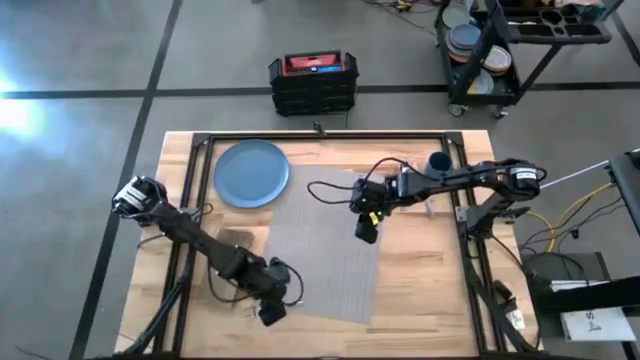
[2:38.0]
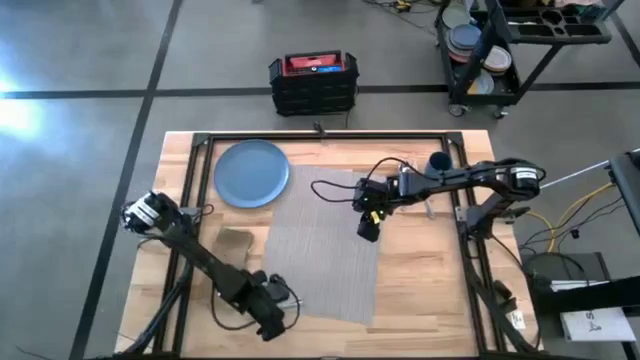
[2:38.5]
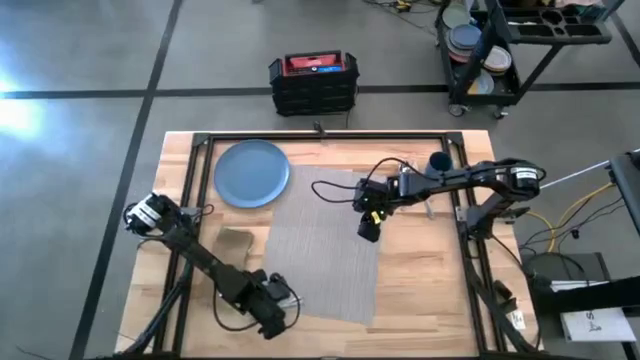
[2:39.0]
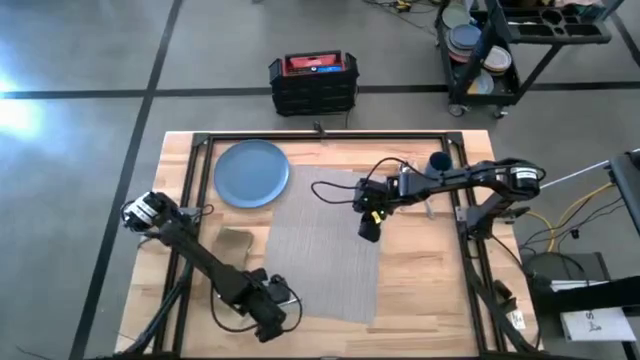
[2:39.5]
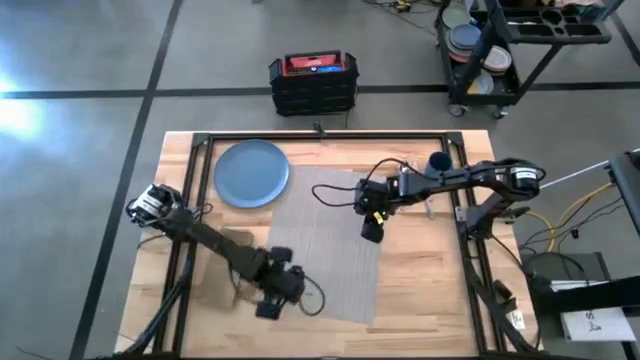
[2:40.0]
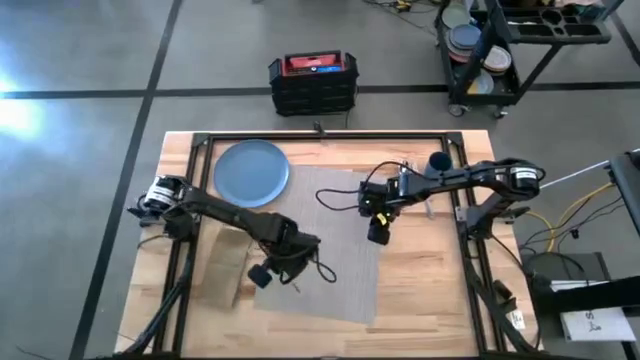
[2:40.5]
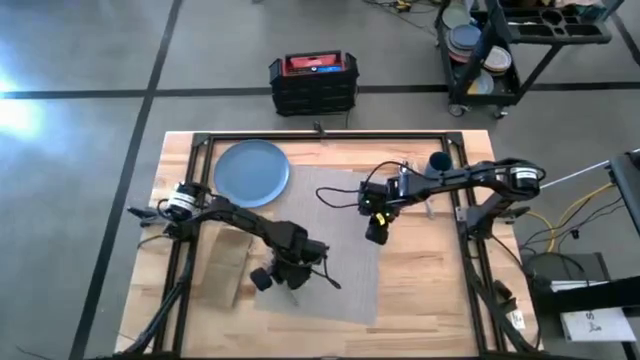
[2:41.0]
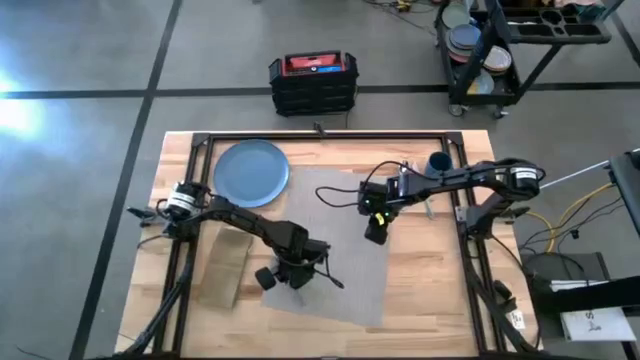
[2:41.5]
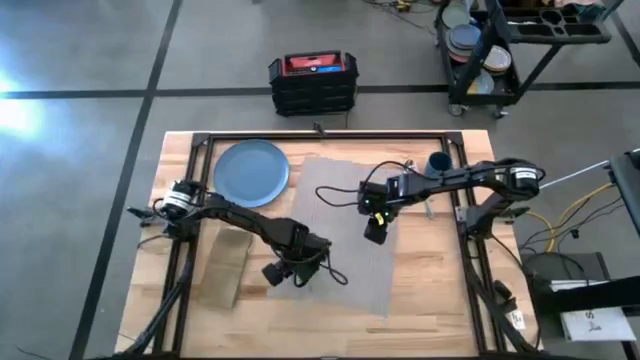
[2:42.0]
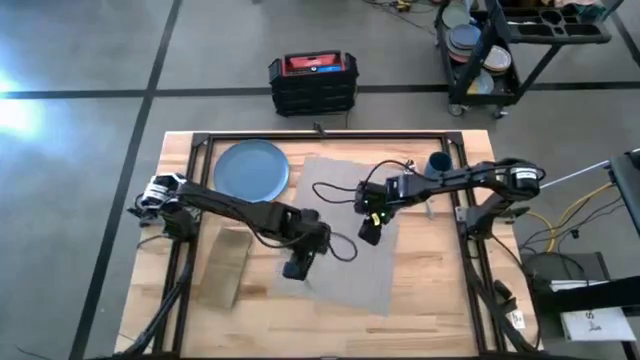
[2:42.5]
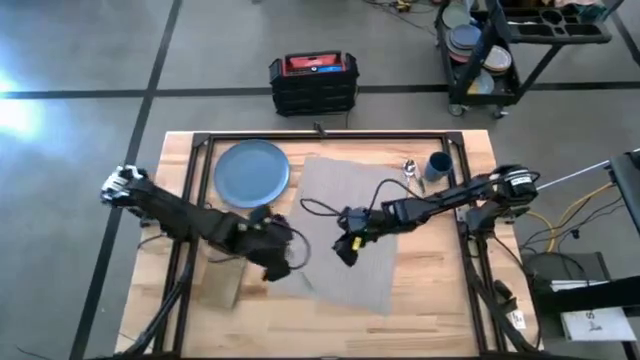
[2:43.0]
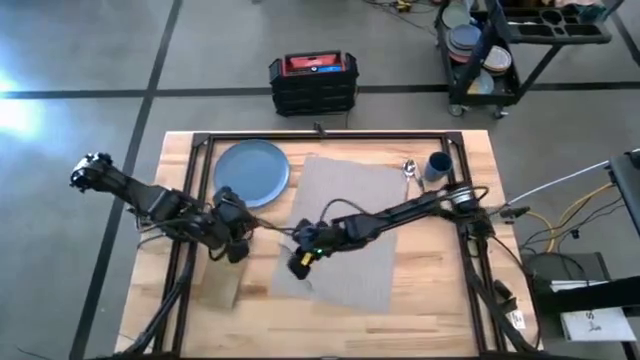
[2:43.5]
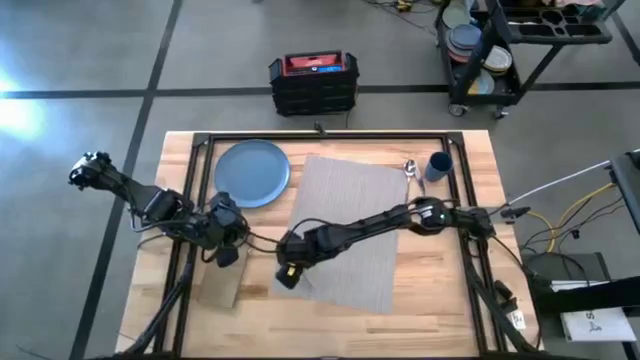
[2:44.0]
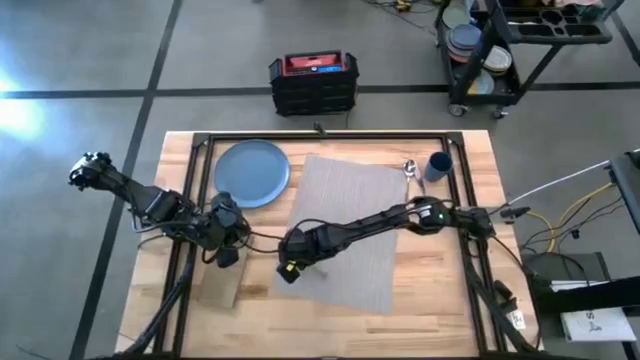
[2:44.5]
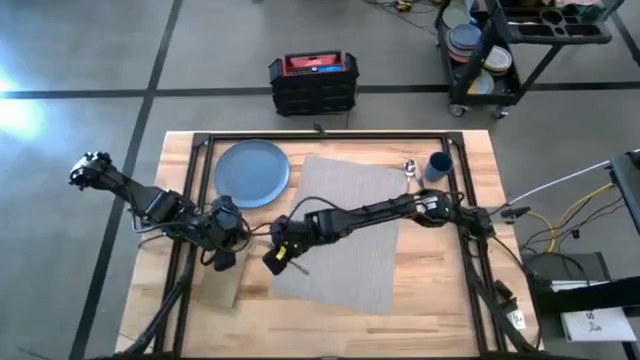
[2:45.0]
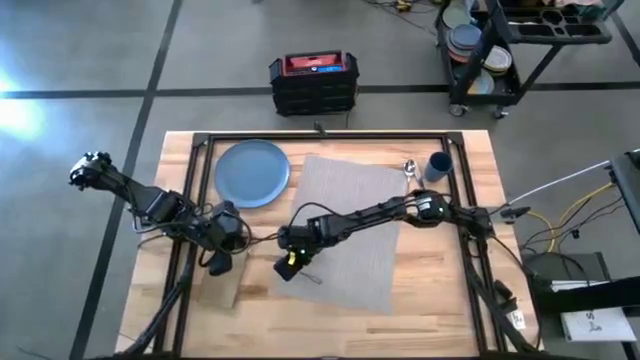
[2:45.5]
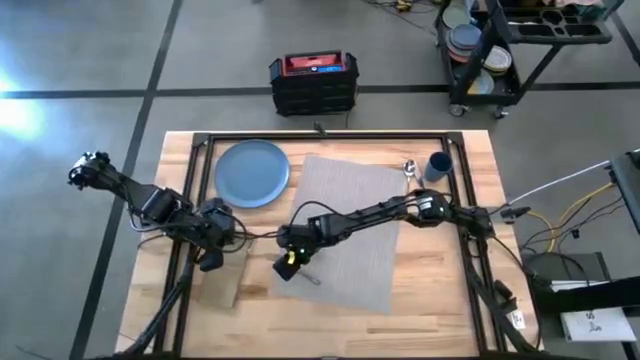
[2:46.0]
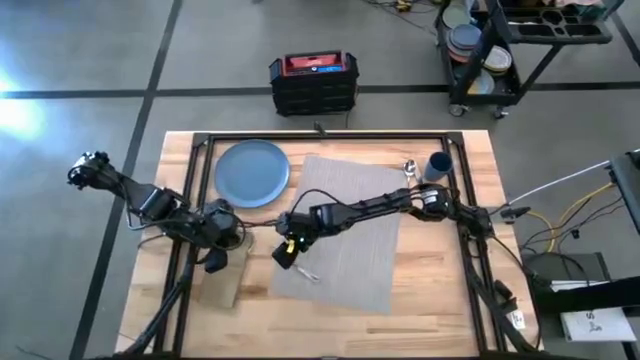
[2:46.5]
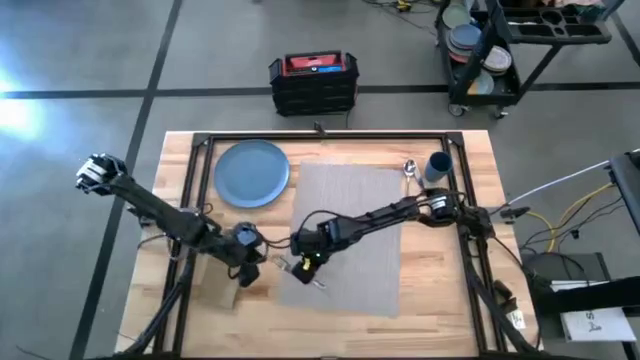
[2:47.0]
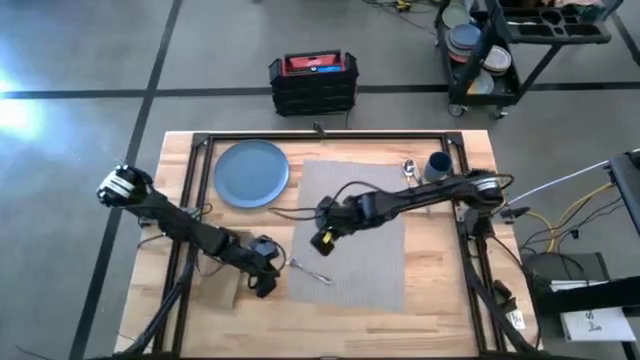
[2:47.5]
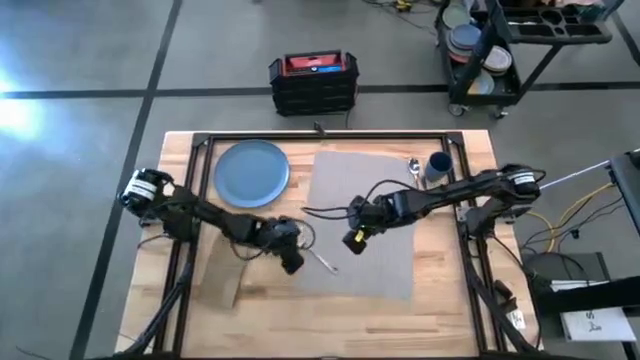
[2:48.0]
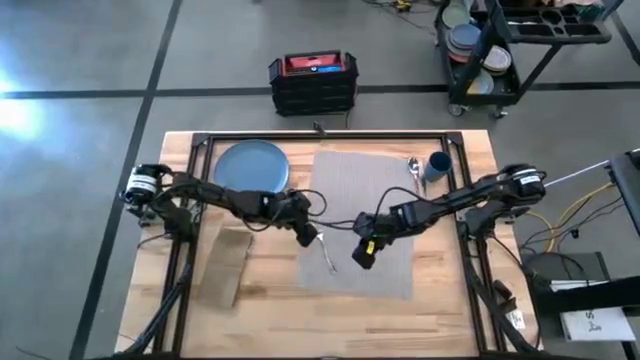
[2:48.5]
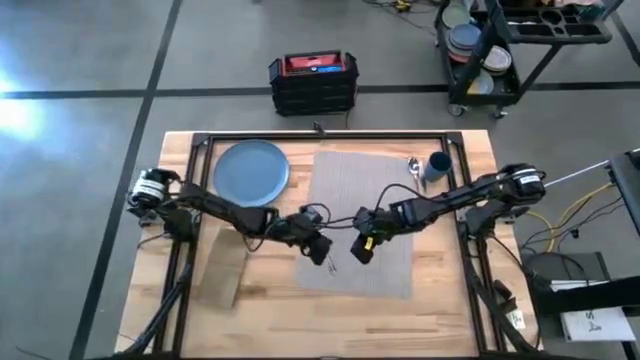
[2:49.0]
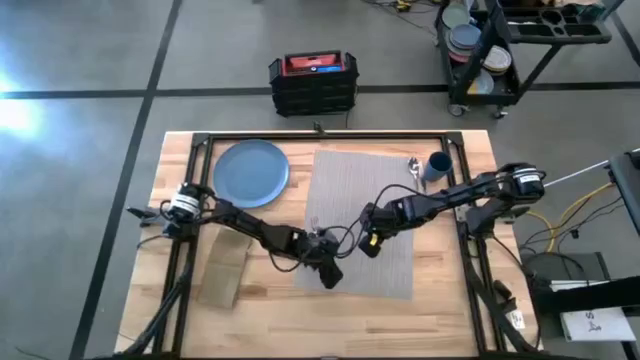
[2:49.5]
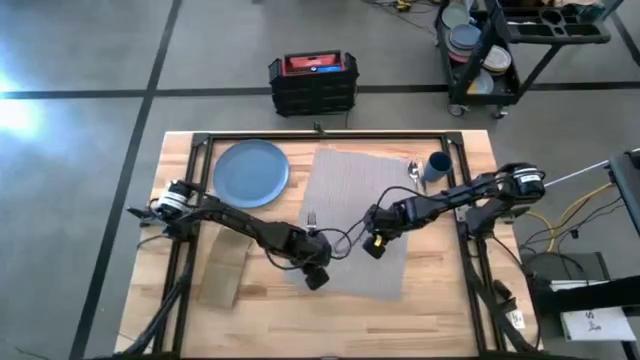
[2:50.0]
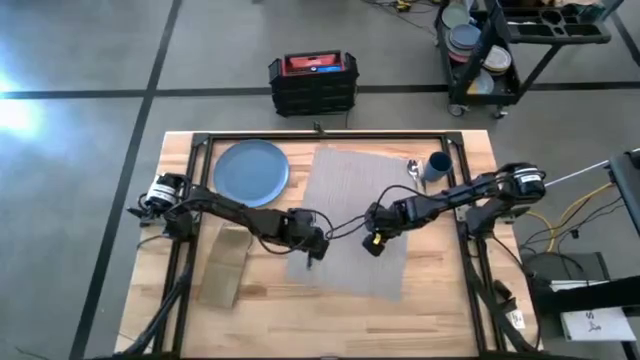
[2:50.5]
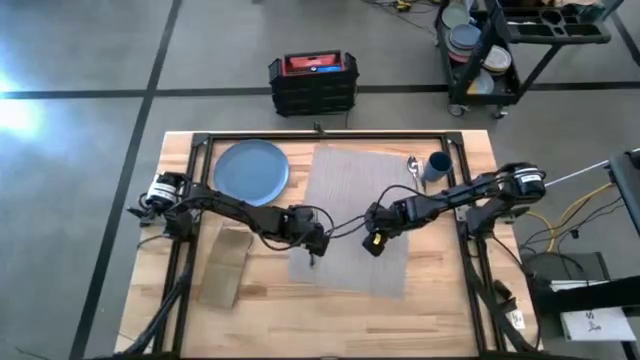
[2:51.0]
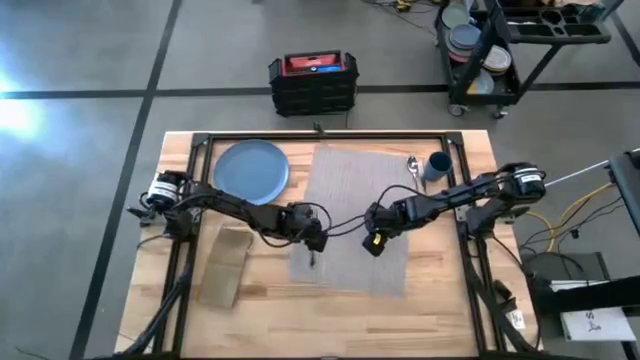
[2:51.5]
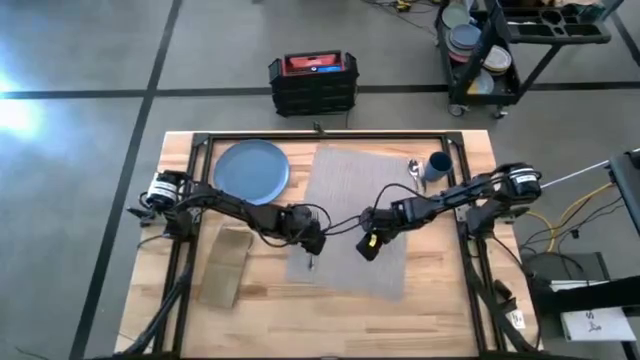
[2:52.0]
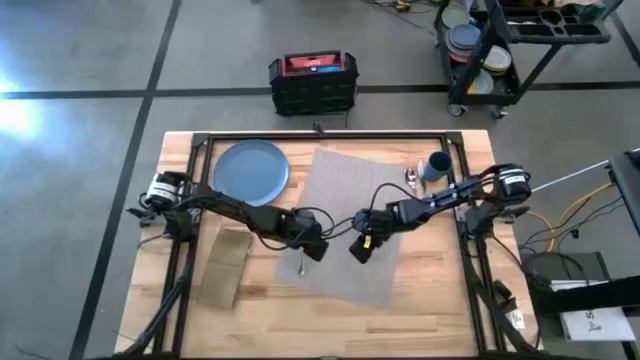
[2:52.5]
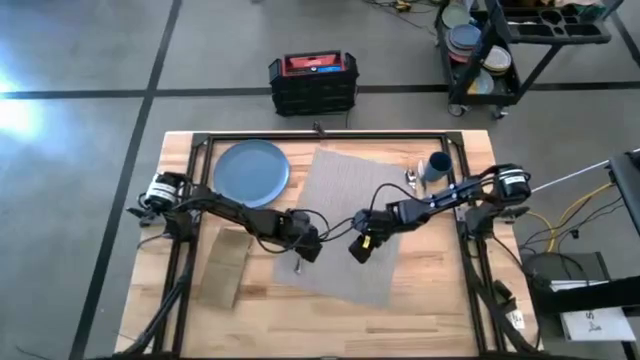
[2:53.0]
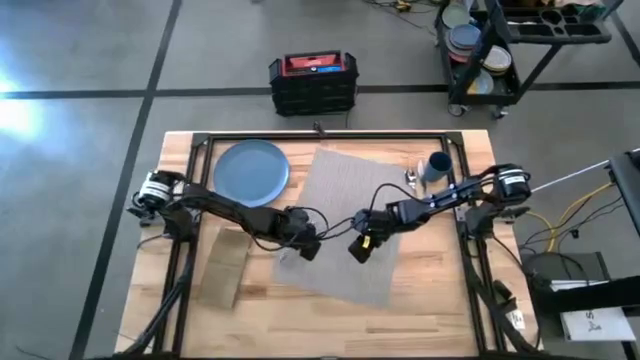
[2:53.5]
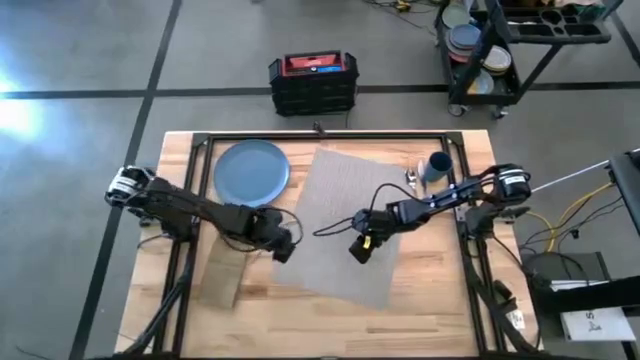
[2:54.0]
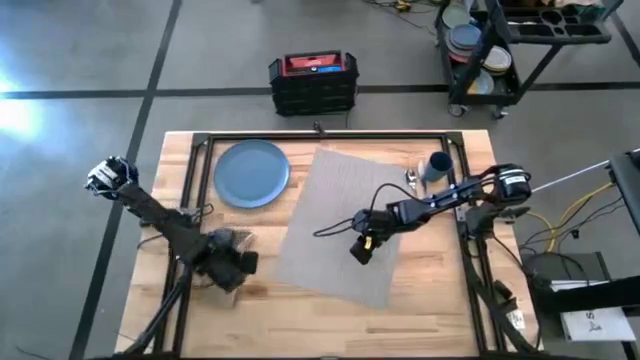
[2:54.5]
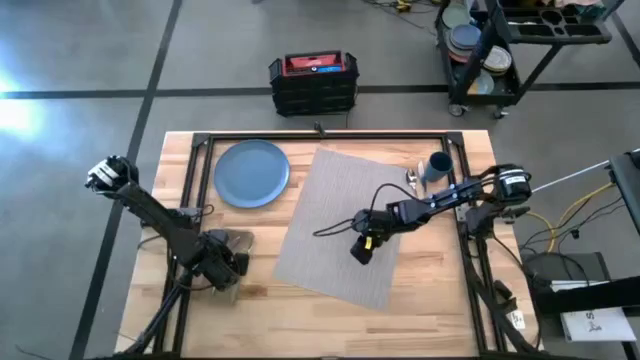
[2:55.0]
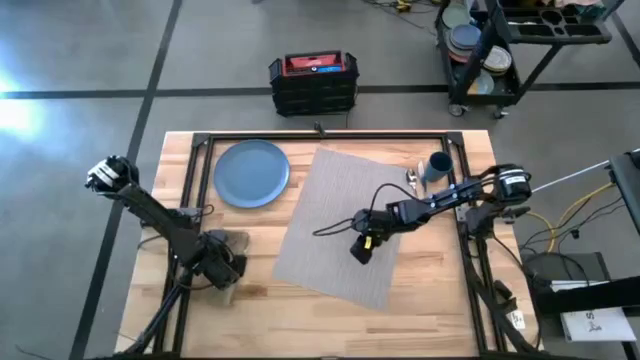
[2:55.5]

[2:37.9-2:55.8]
Task: Set table place
Put the silver fork on the brown table napkin

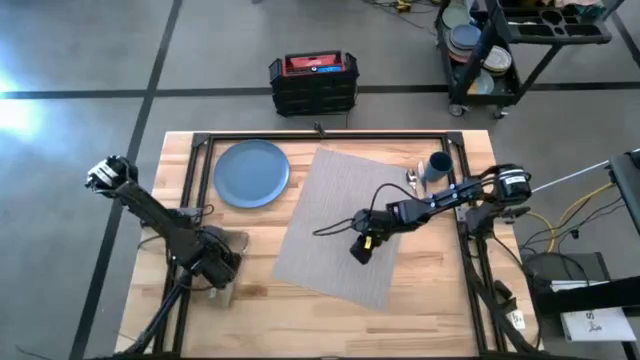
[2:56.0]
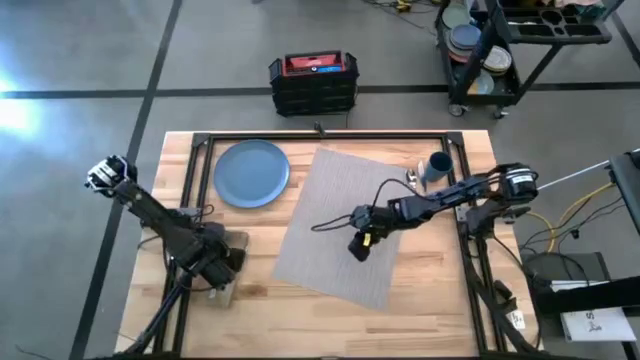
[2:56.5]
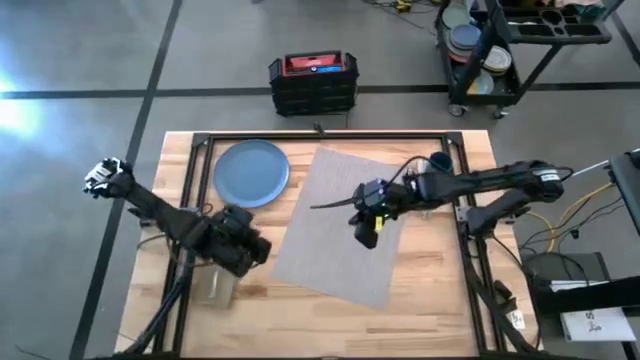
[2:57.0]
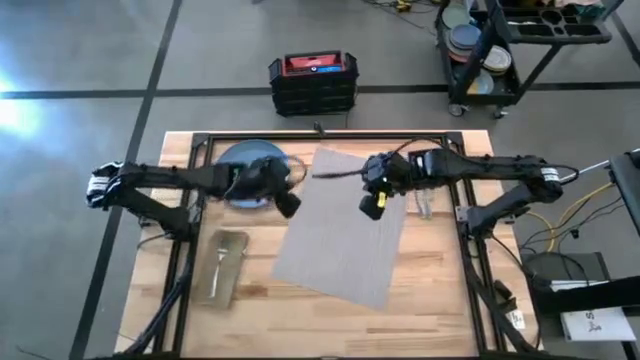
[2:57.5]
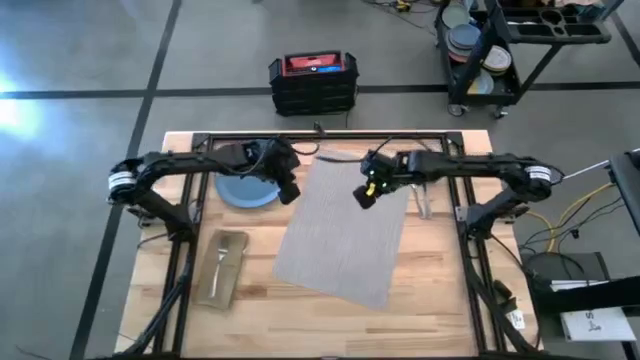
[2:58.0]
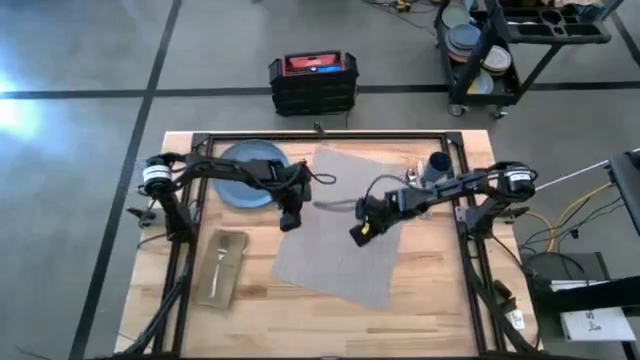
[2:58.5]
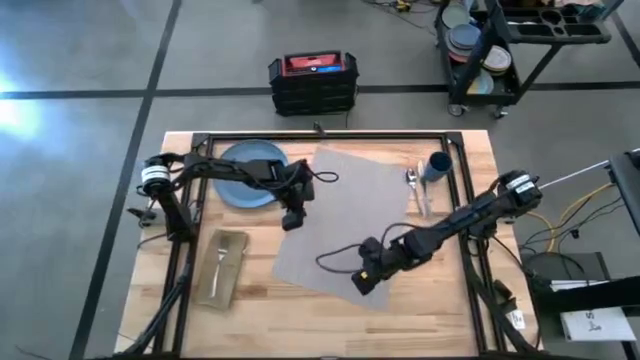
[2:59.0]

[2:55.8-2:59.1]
Adjust the gray table mat

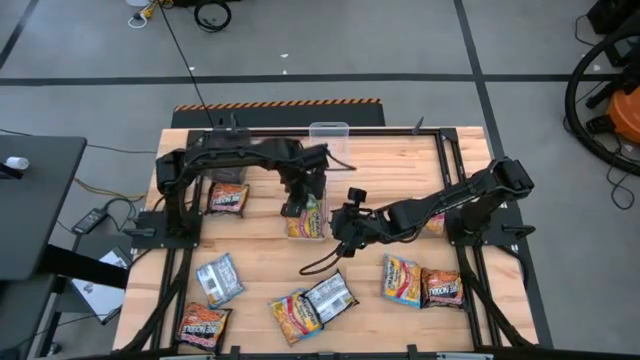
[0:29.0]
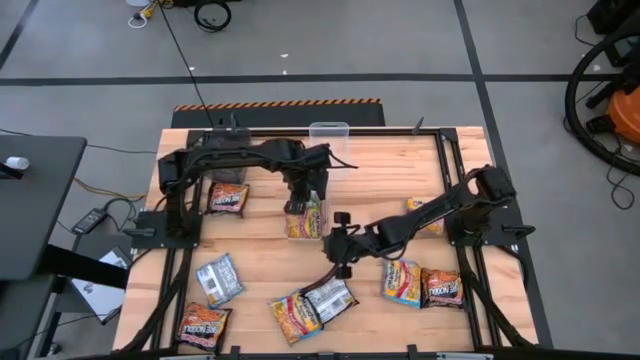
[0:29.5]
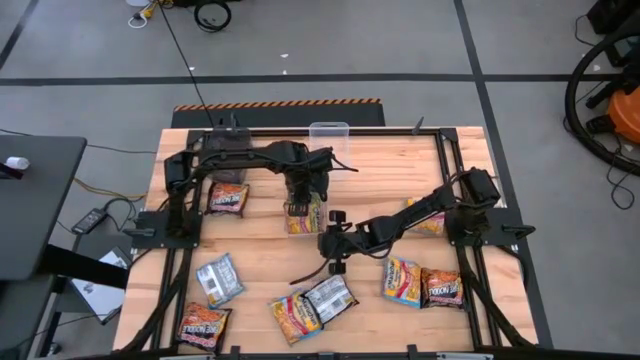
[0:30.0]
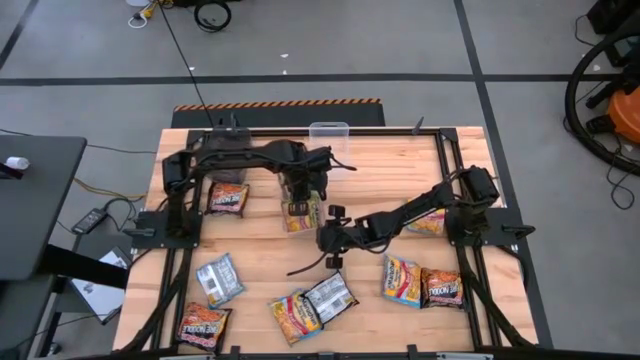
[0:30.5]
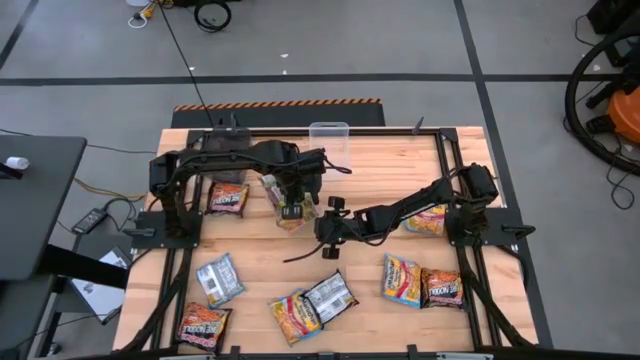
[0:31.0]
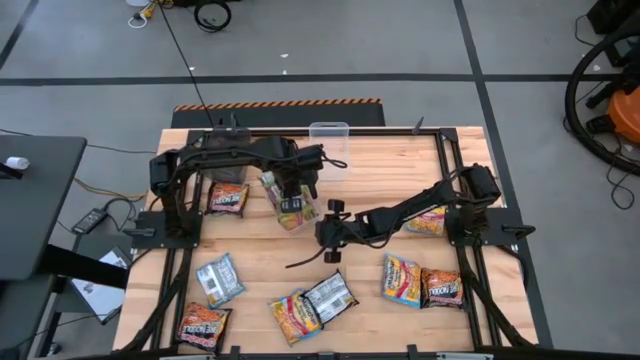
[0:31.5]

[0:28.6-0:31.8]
Task: Sort Maruchan noodles
Adjust the green noodle pack on the bottom transparent bin
